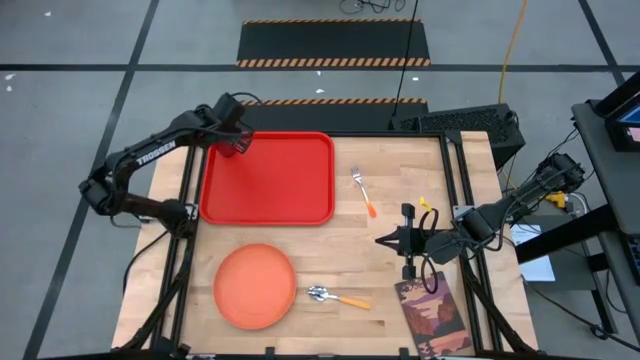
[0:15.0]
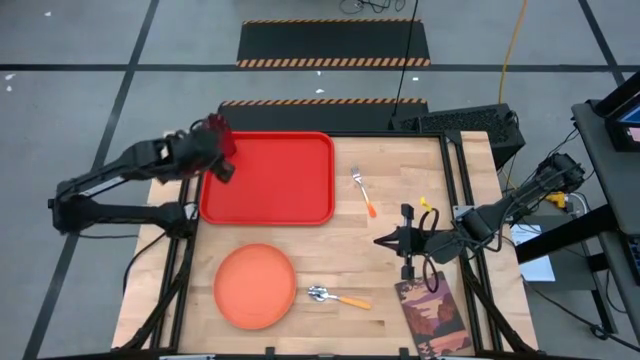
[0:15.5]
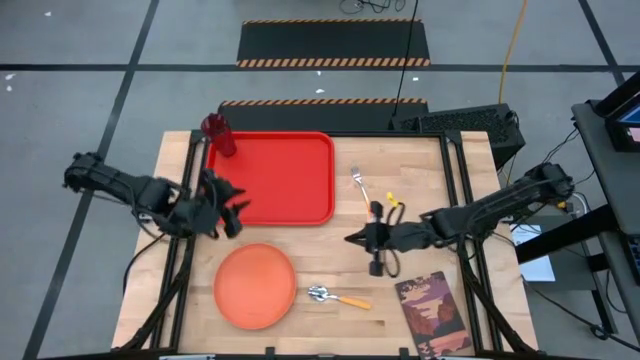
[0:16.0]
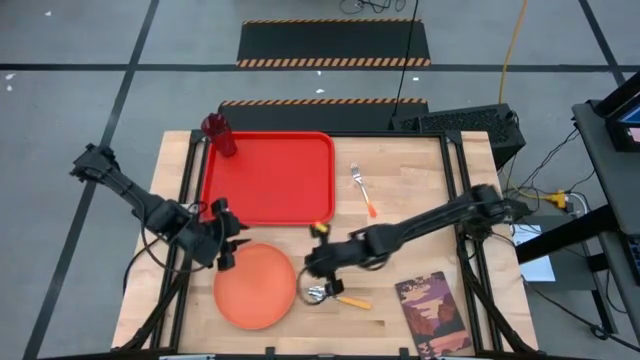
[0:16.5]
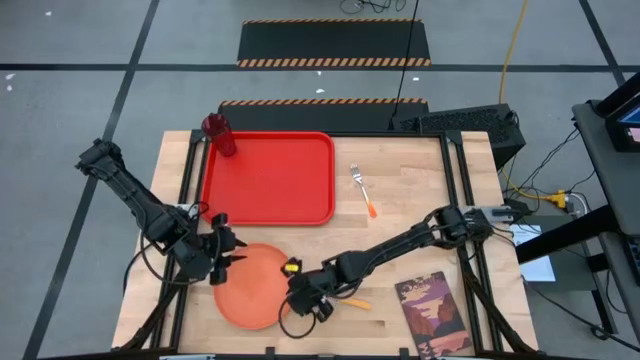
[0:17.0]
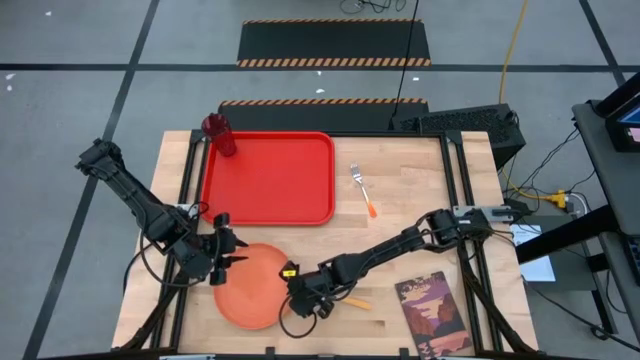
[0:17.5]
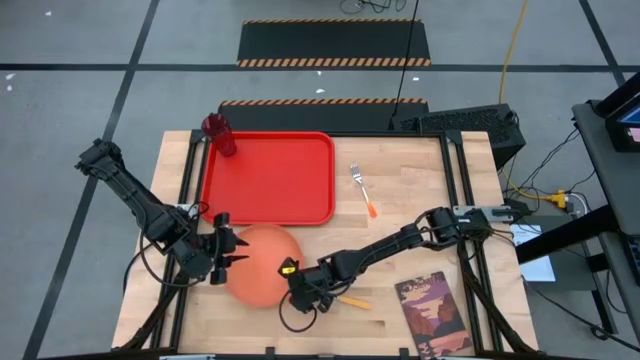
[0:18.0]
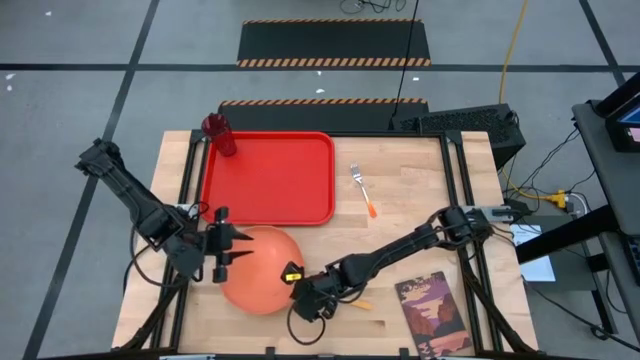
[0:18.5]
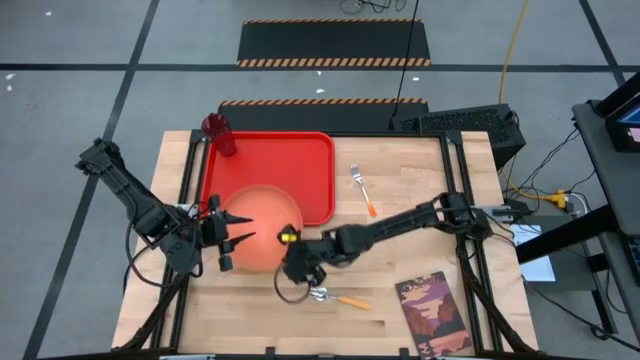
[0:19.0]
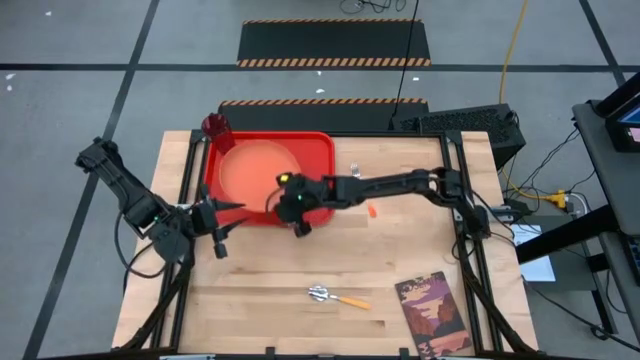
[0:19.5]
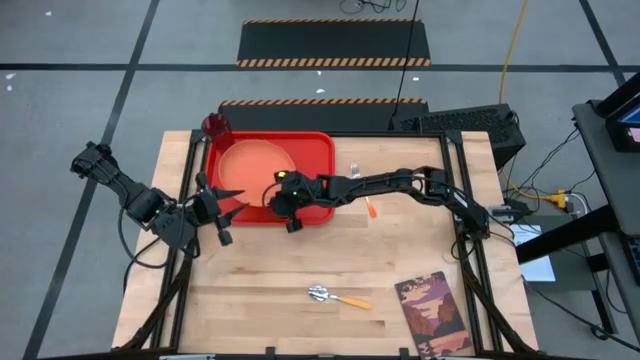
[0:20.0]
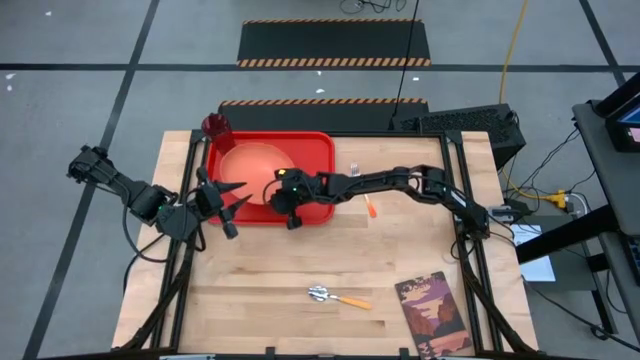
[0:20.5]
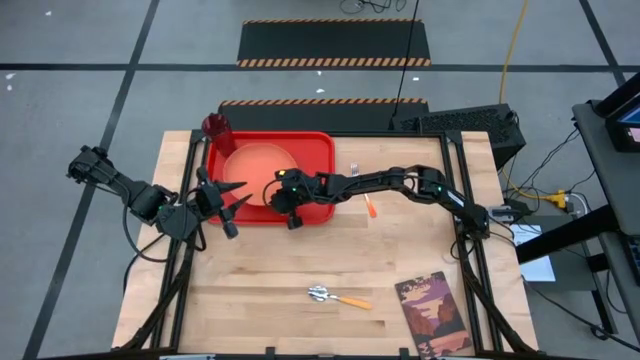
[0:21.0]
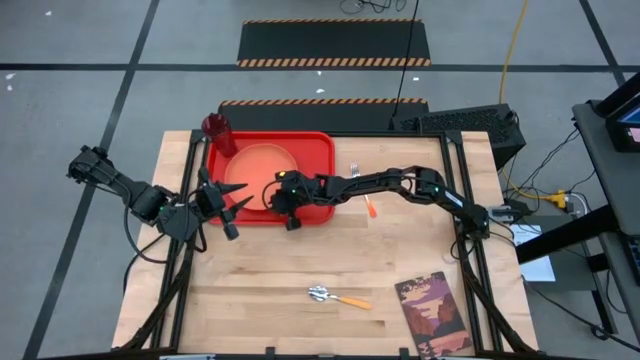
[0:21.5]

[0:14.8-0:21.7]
Task: Pick and place plate/cup/fork/spoon on tray
Put the light orange plate on the orange tray to the bottom right of the red cup

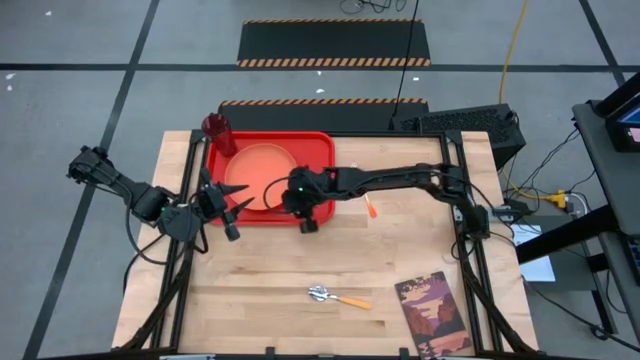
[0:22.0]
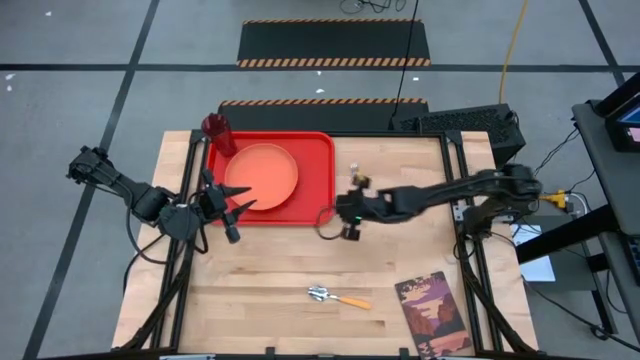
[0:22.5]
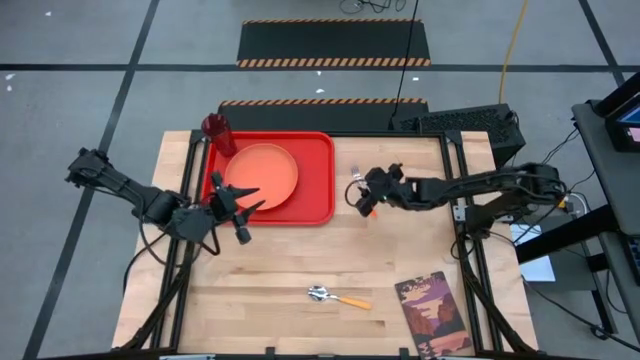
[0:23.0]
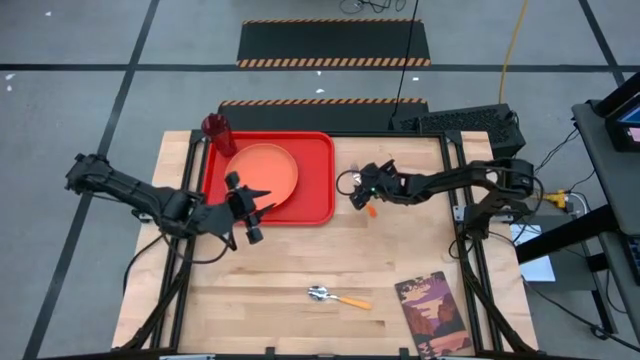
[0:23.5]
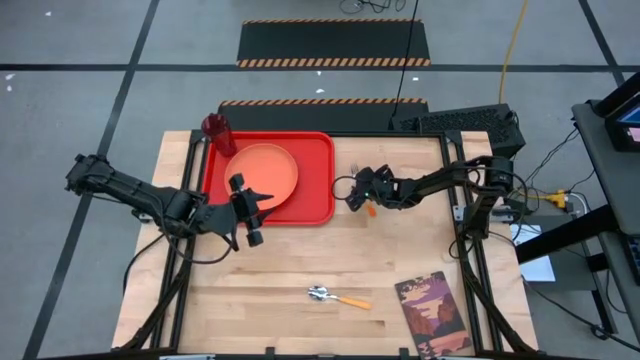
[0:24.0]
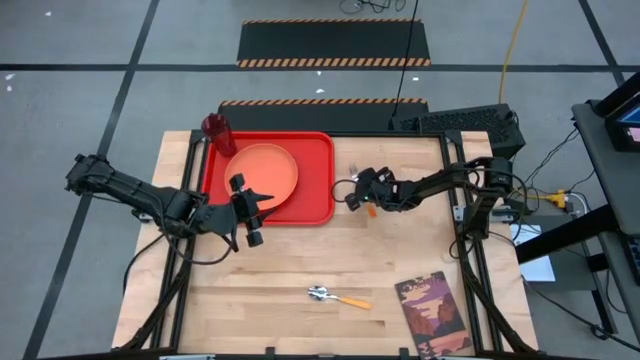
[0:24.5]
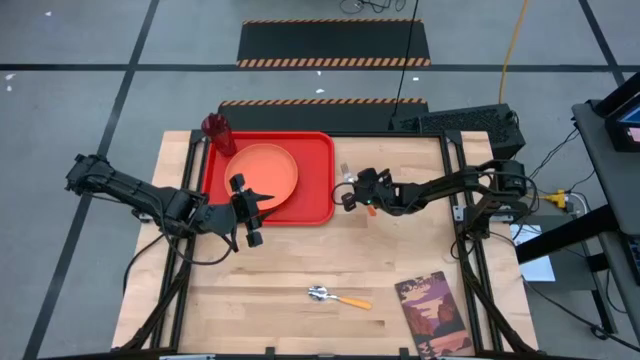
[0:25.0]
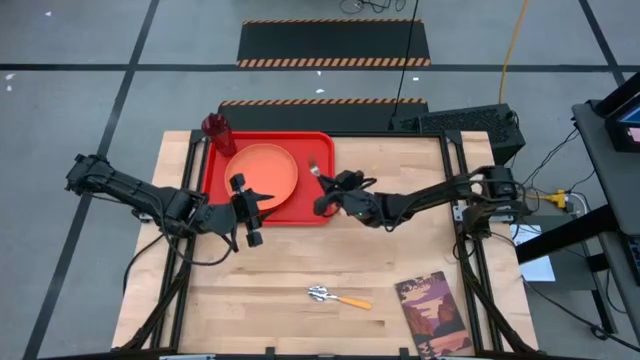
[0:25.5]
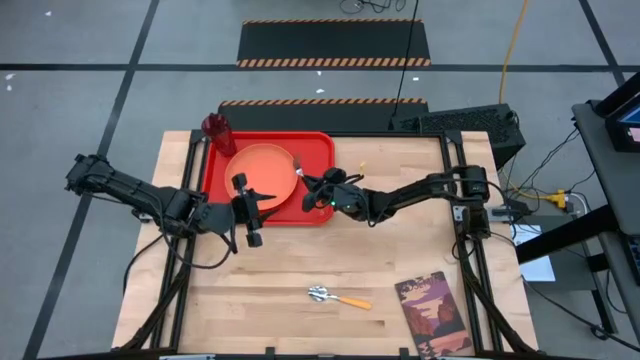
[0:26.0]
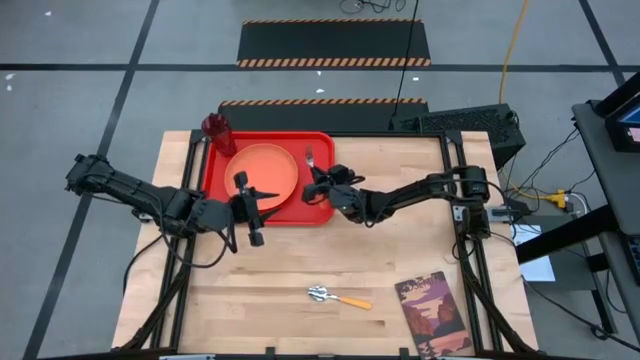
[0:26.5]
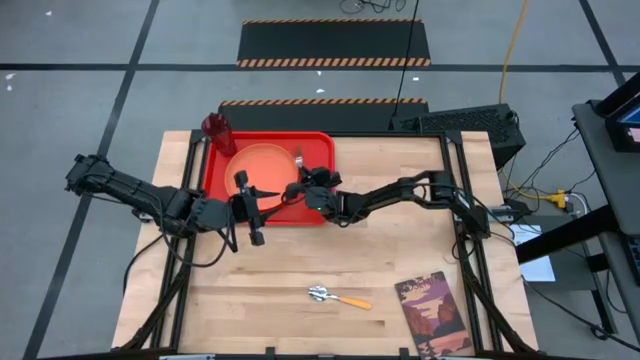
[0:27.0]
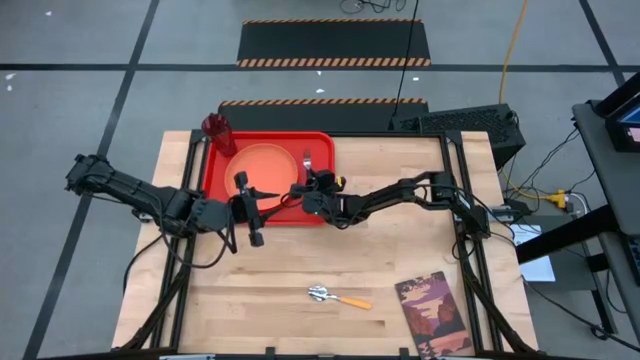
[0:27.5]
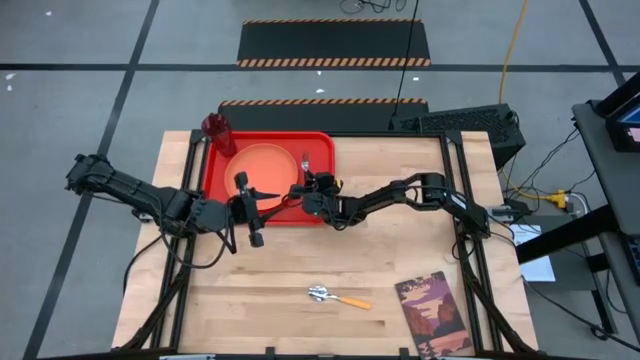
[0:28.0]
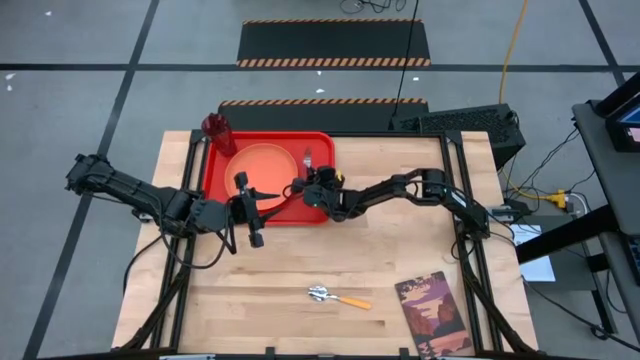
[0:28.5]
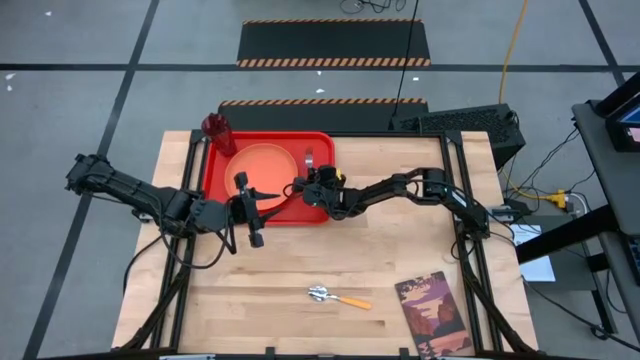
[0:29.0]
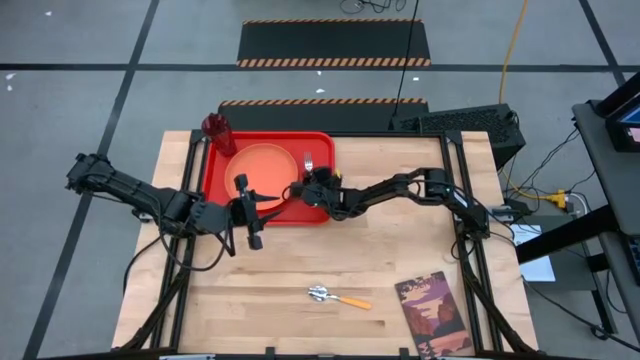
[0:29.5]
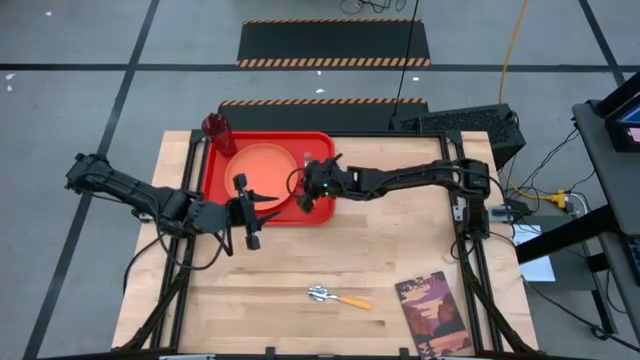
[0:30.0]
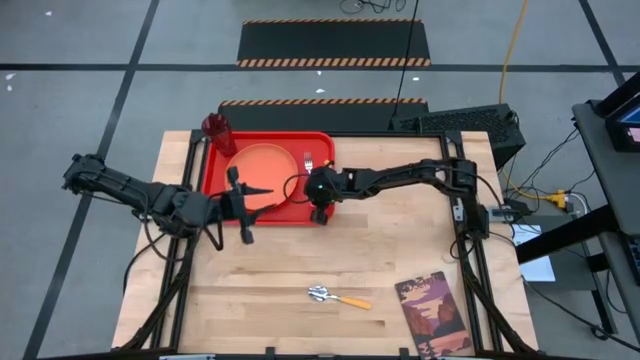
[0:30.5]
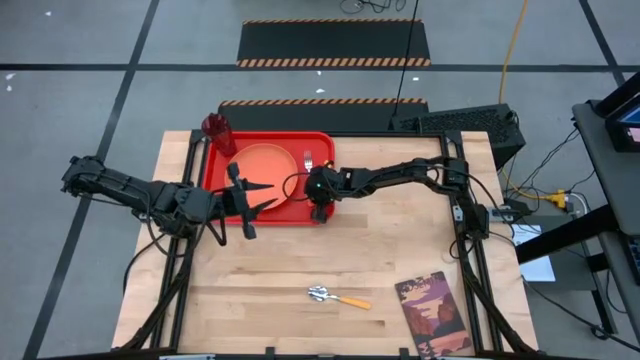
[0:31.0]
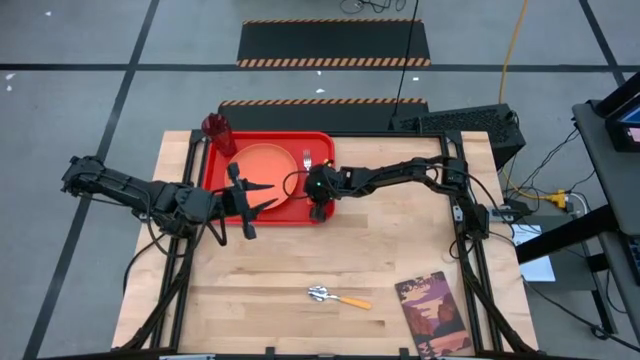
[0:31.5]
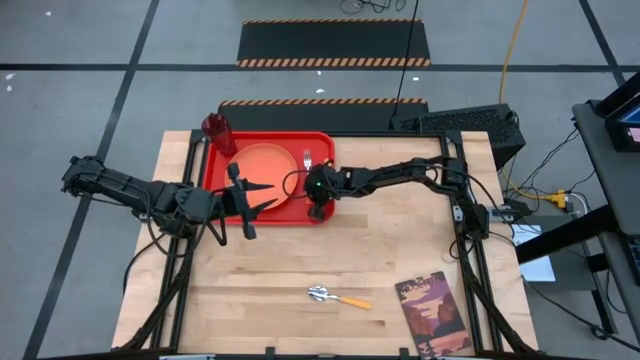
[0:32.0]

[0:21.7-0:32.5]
Put the orange fork on the orange tray to the right of the light orange plate

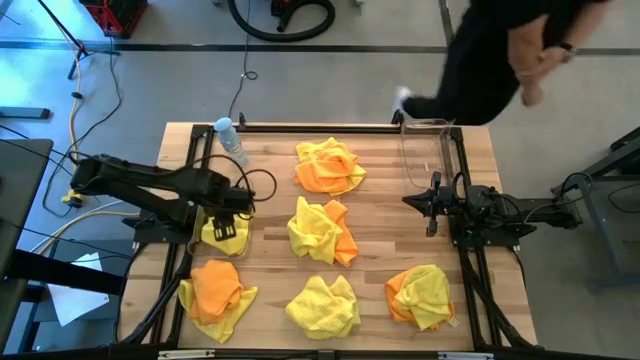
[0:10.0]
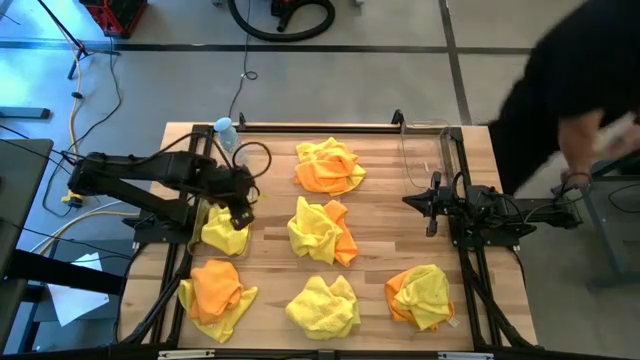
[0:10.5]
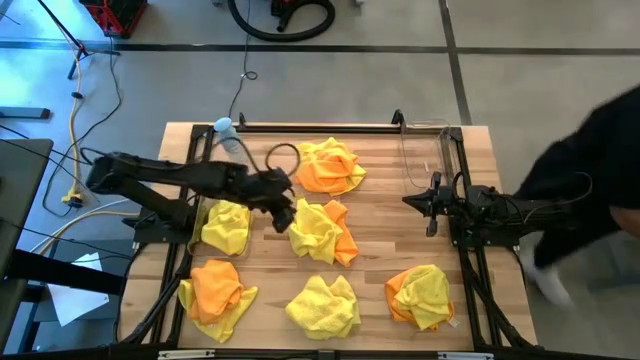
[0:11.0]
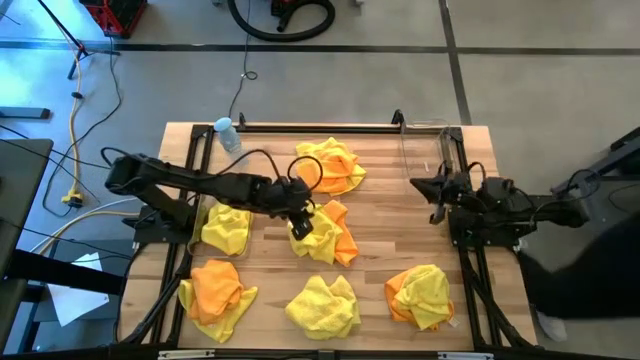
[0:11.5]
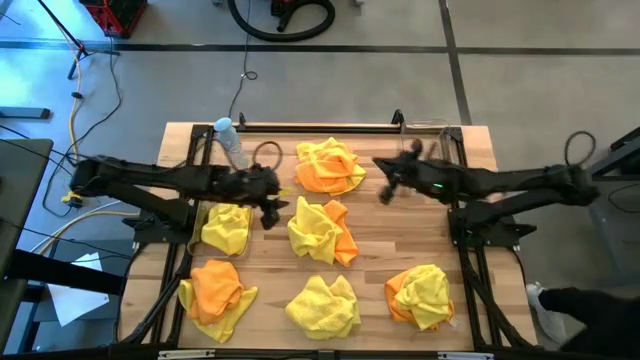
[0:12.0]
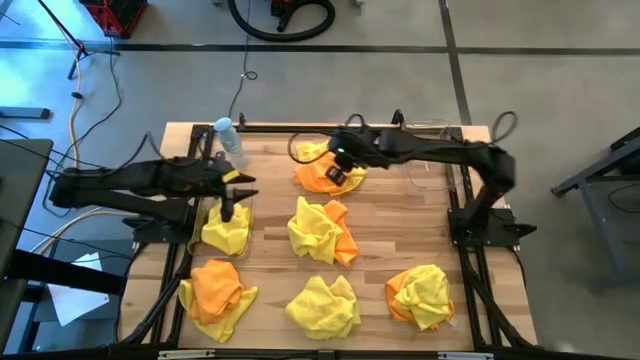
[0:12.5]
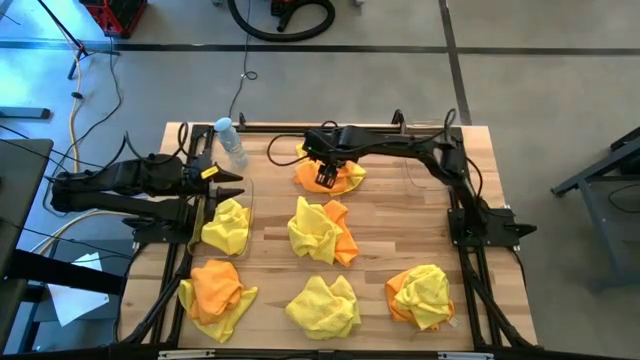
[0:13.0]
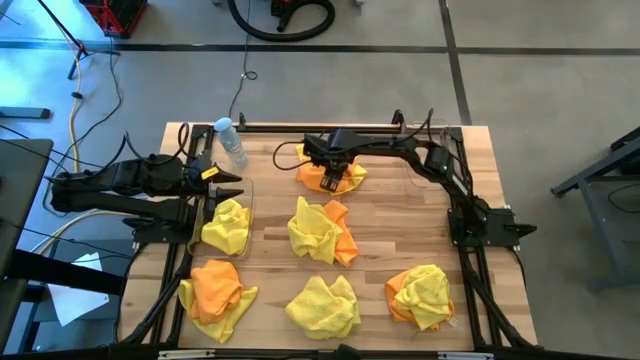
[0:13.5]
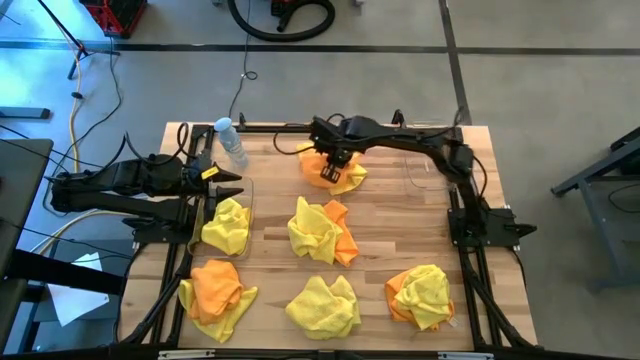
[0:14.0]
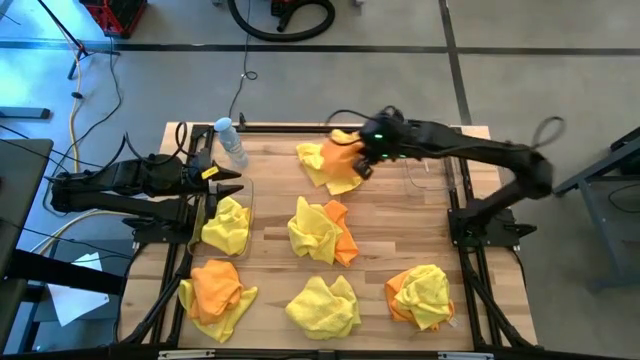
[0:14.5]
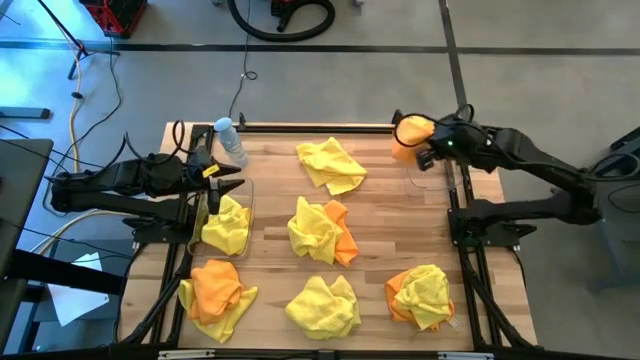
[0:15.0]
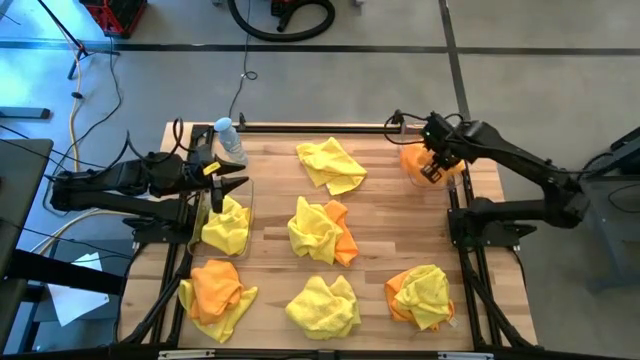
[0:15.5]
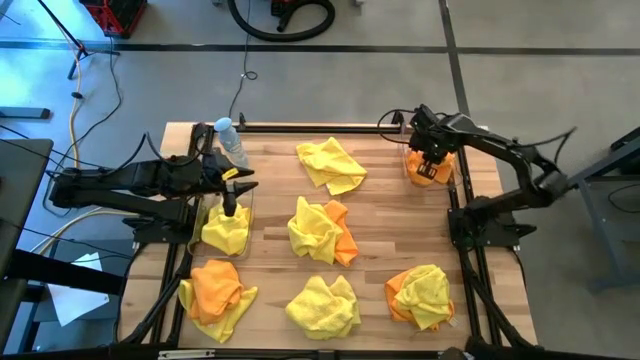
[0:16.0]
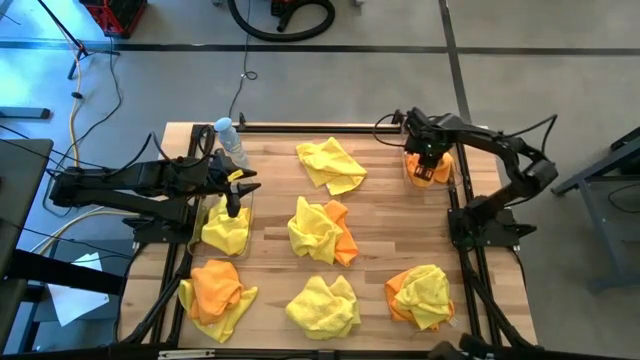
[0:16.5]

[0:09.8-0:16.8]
Task: Sort microfiber towel by color & place in baskets
Put the orange microfiber cloth into the right transparent bin
